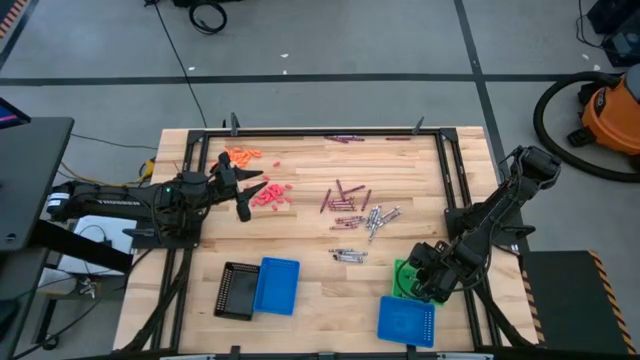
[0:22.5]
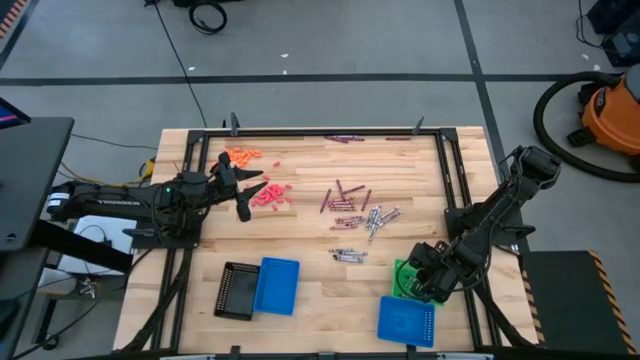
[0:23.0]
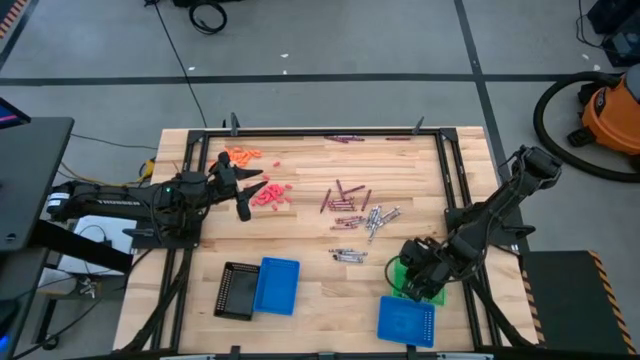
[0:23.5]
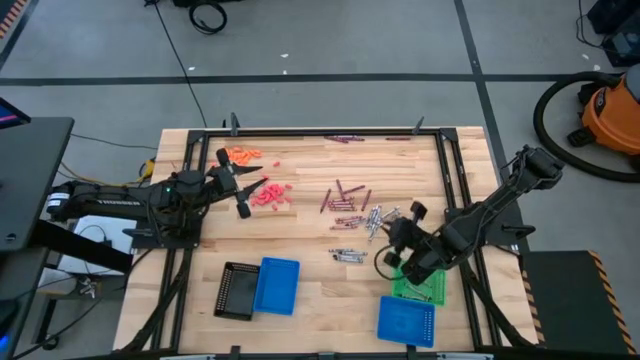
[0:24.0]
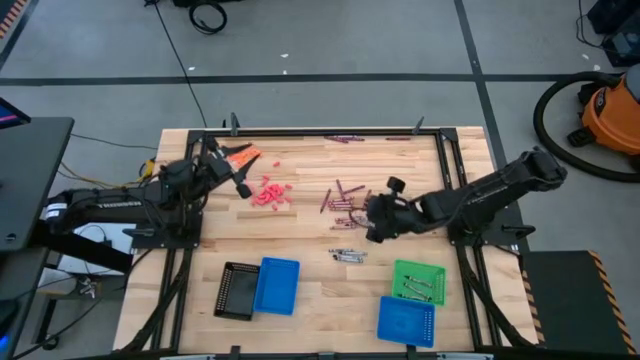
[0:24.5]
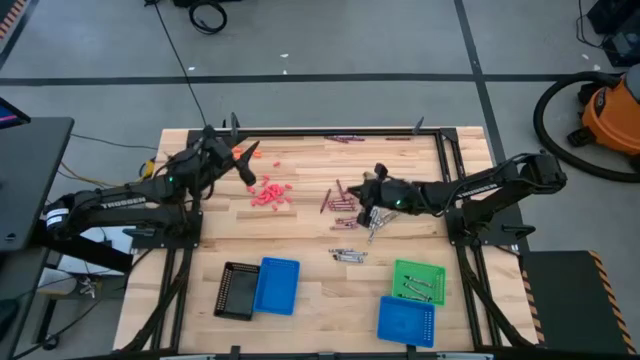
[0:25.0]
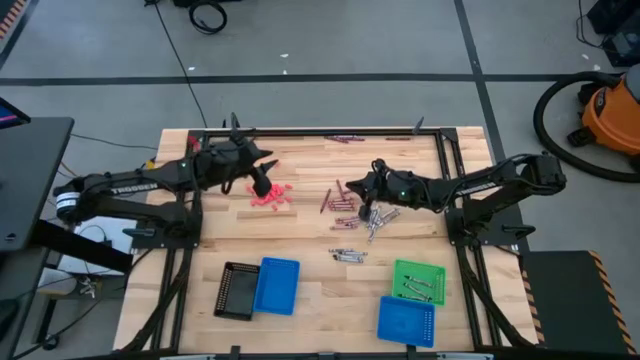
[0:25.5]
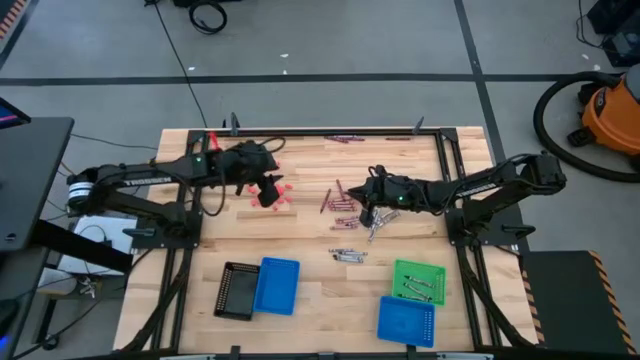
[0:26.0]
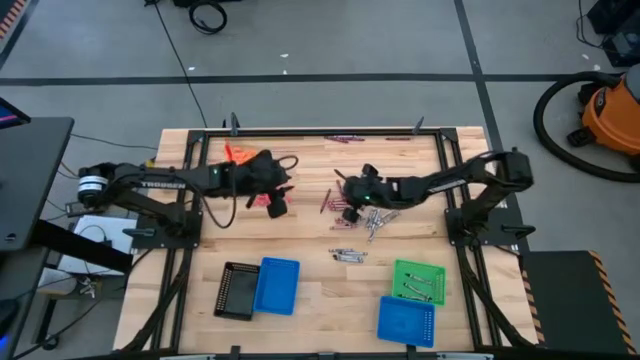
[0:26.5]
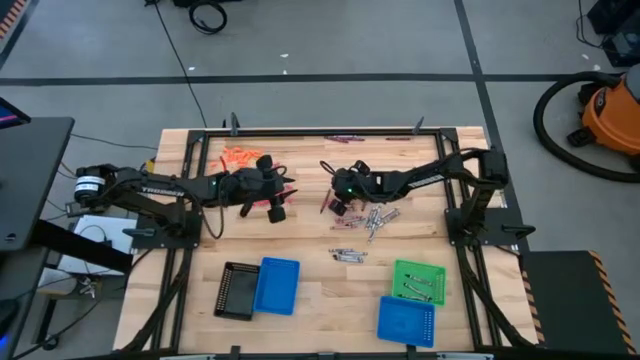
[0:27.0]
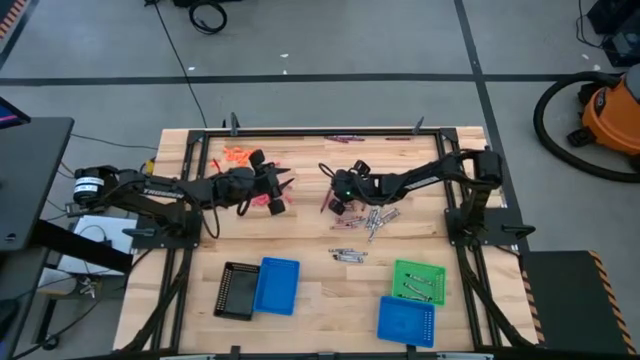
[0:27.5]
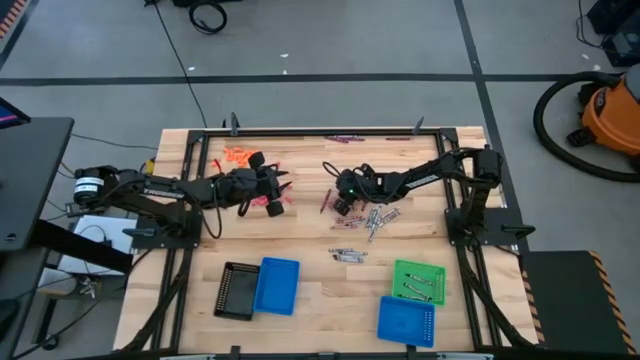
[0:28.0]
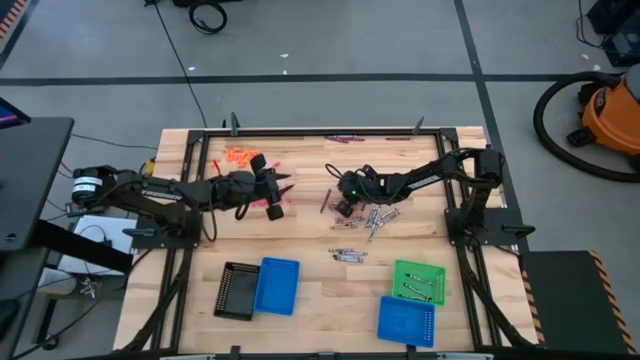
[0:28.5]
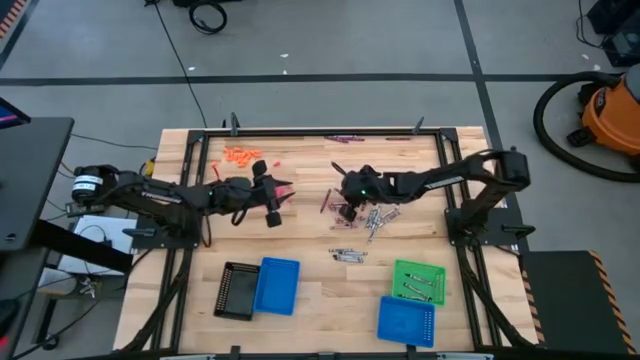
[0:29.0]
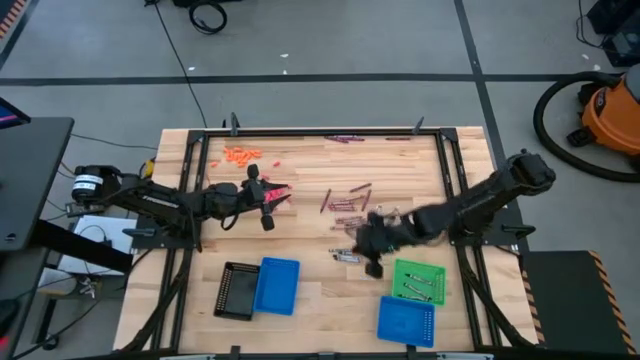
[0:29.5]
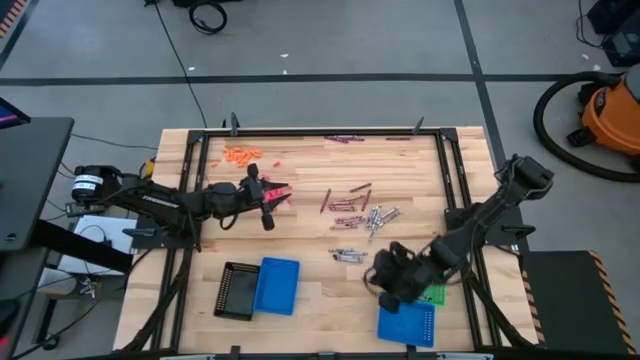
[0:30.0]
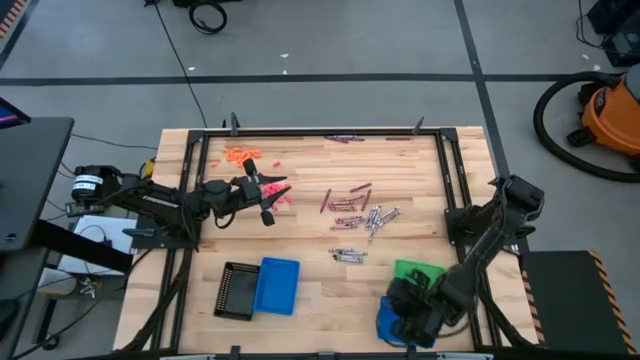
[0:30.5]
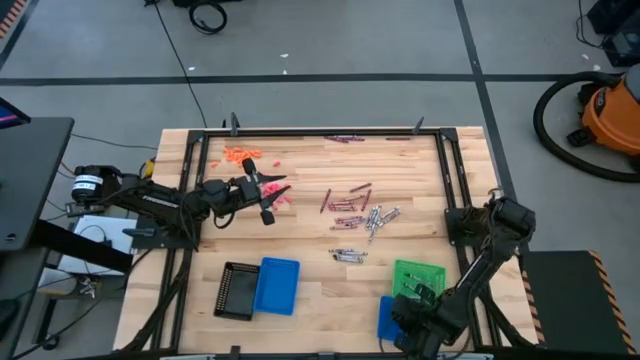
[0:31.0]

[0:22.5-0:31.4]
Task: Sort crayons
Put the red crayon into the right blue bin

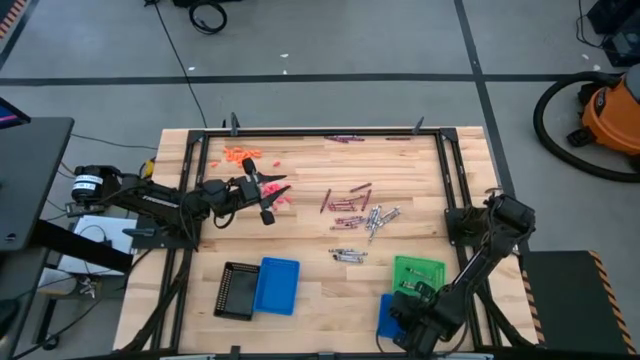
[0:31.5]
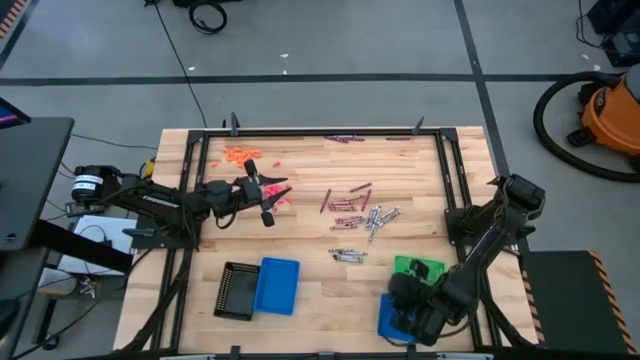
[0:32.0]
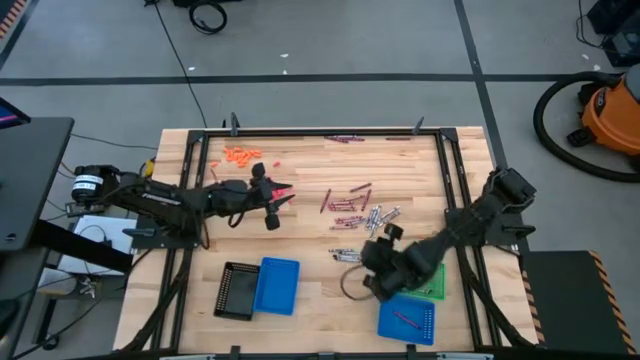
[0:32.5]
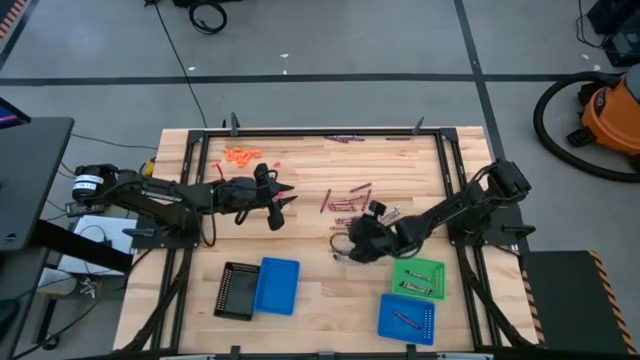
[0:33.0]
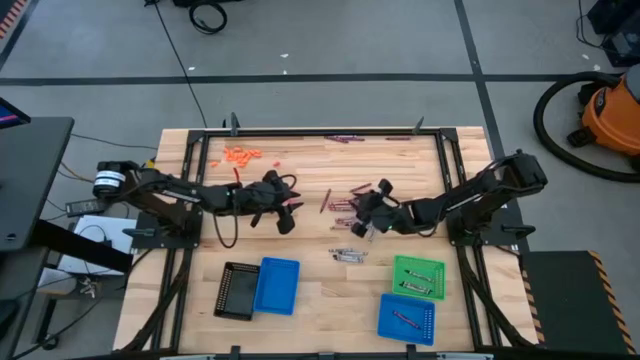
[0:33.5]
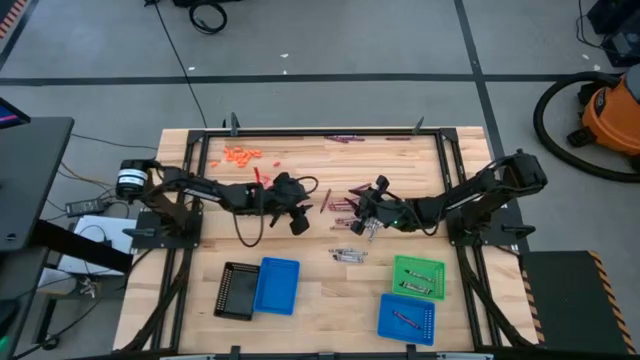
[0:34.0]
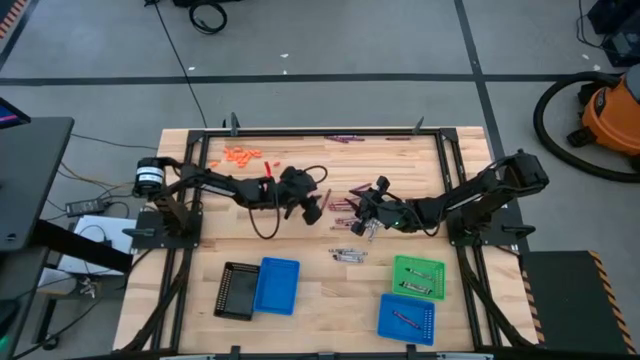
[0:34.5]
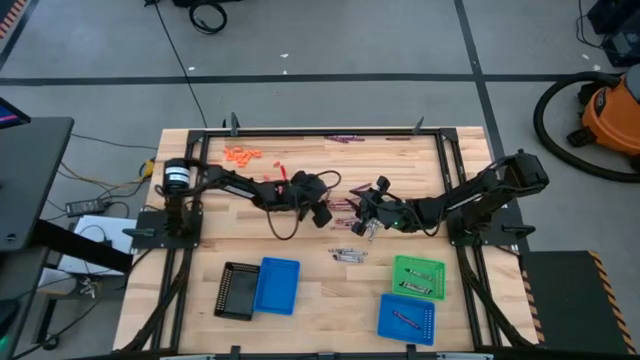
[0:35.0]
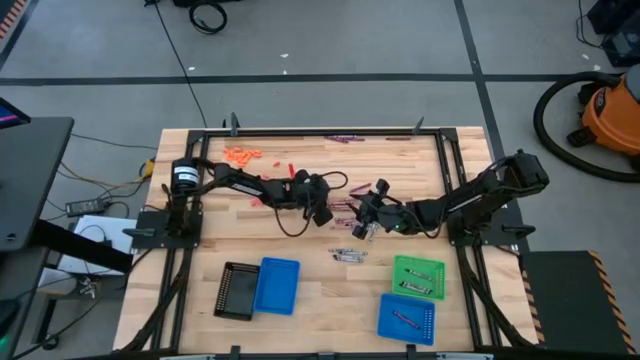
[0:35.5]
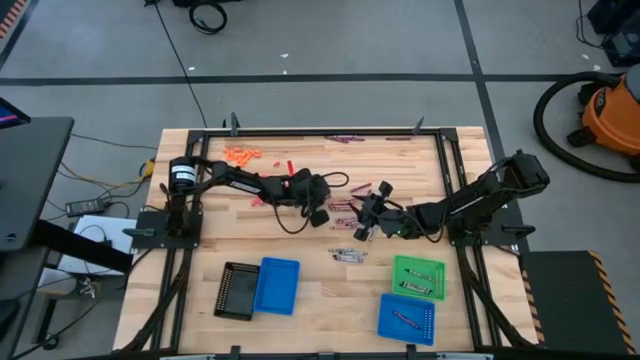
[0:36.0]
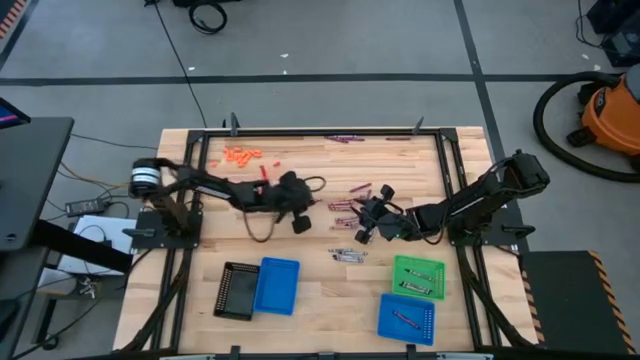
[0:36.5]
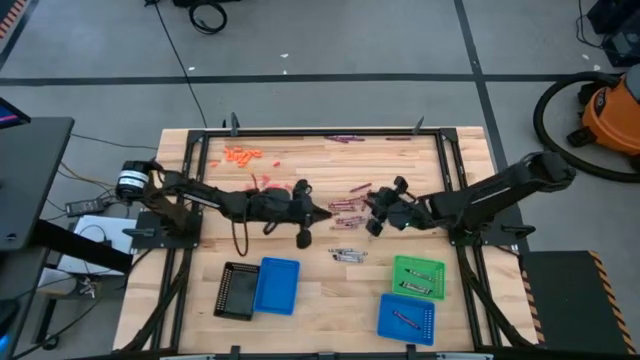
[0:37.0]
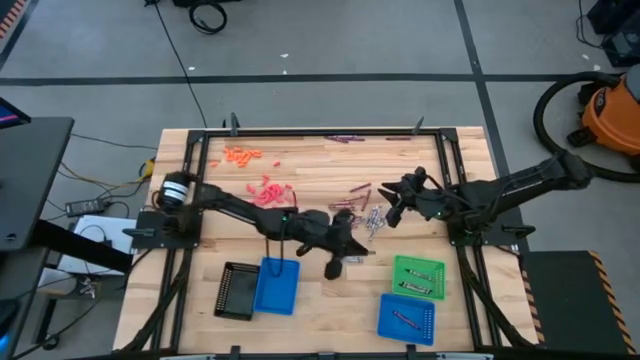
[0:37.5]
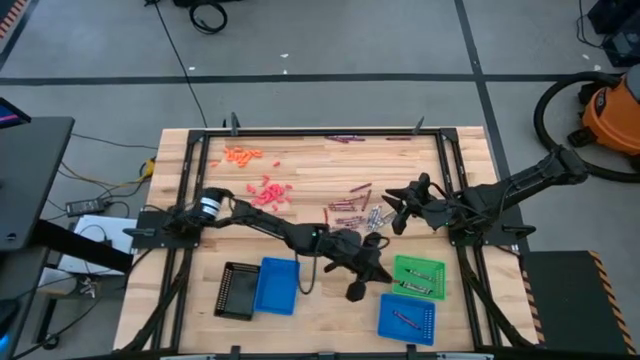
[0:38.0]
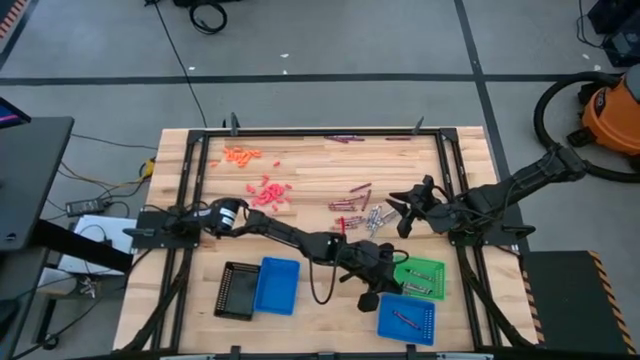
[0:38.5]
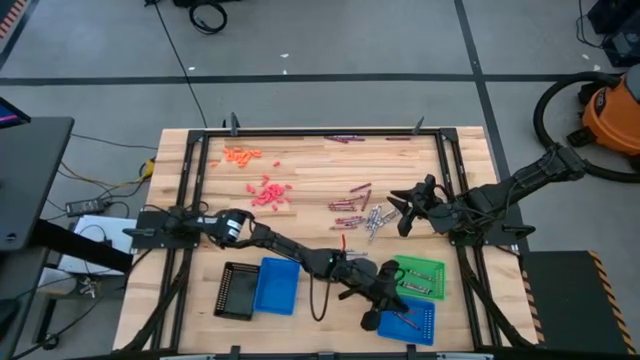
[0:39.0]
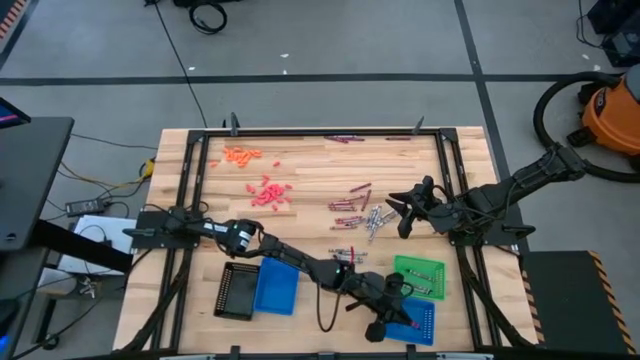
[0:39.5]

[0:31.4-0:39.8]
Put the red crayon into the right blue bin

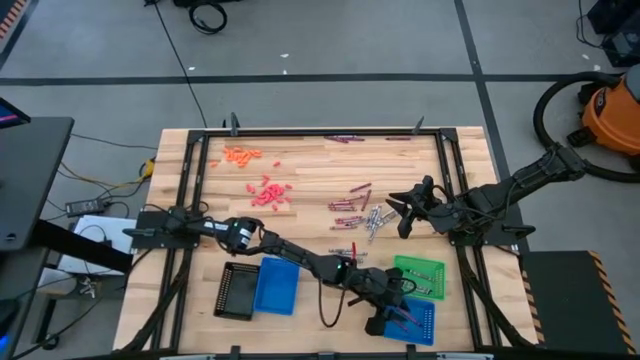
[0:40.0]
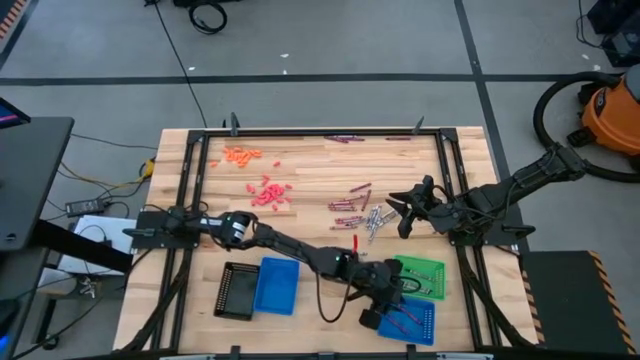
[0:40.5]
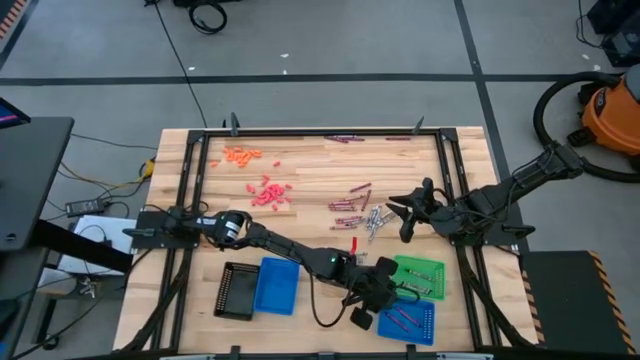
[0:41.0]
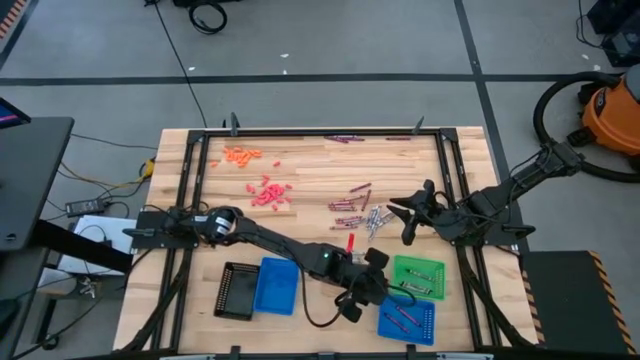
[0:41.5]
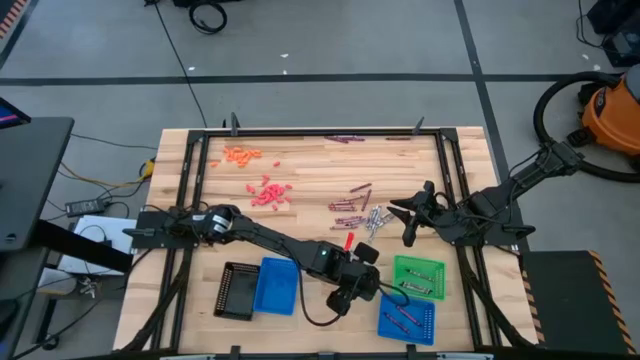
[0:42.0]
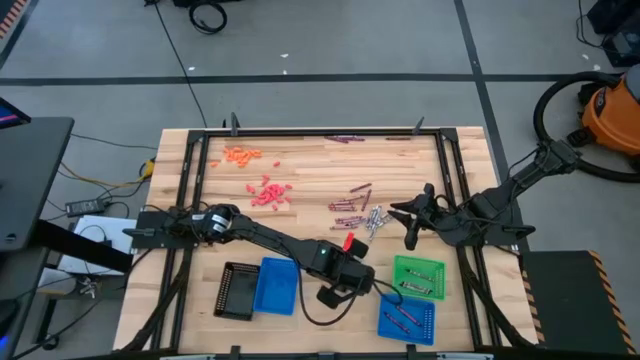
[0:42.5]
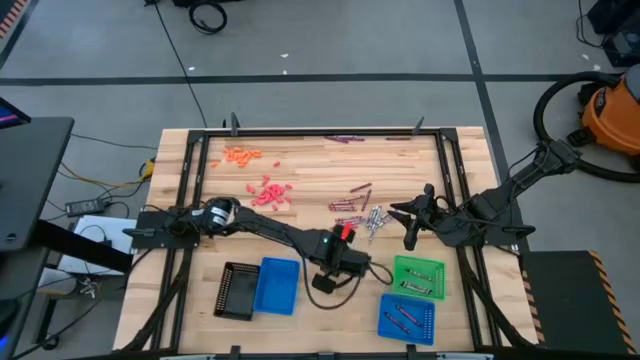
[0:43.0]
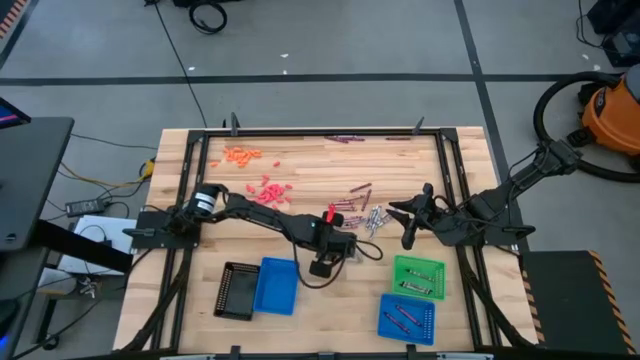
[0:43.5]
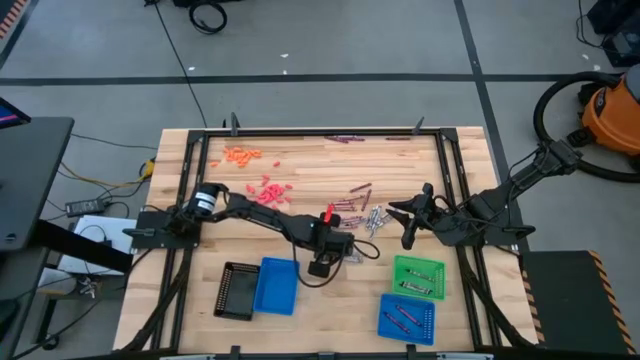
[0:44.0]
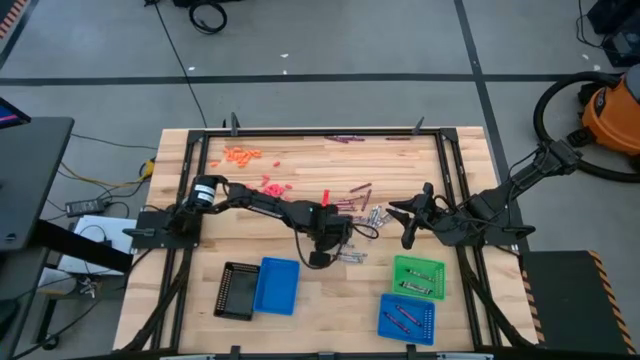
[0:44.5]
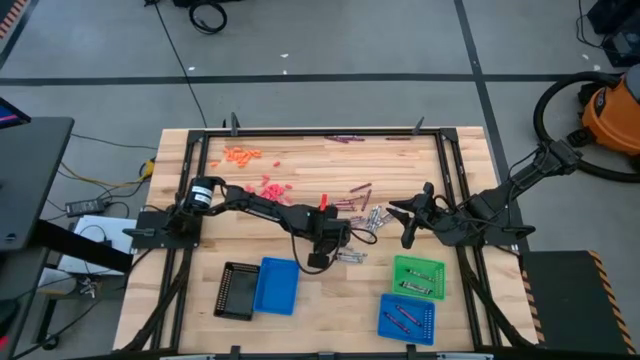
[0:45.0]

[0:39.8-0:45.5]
Put the black crayon into the green bin
